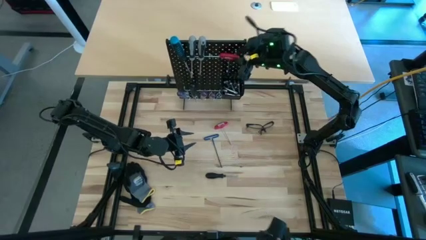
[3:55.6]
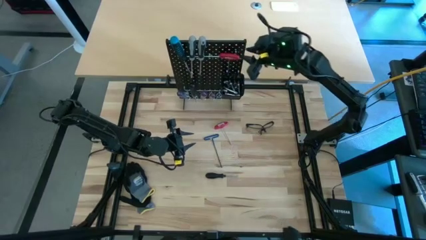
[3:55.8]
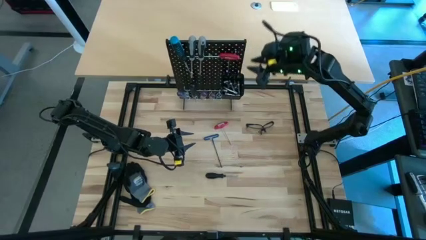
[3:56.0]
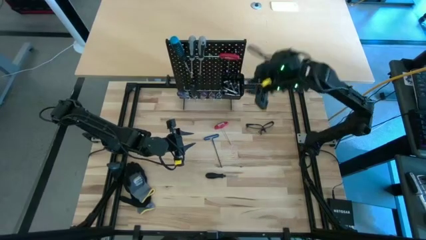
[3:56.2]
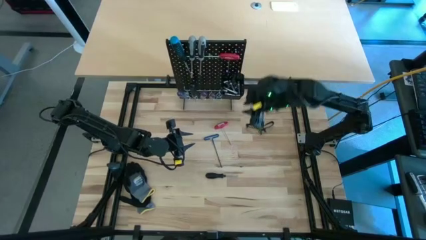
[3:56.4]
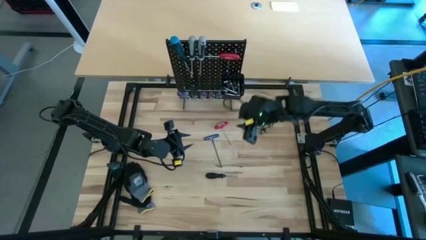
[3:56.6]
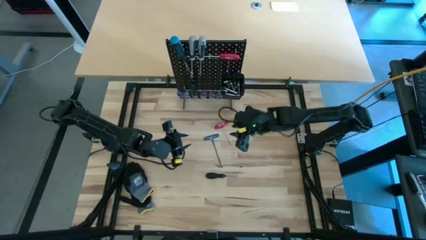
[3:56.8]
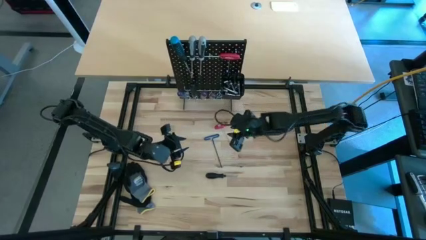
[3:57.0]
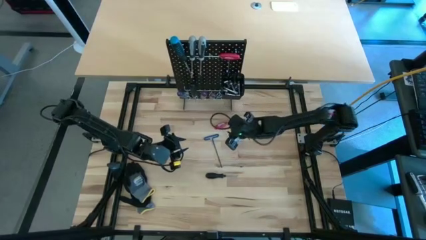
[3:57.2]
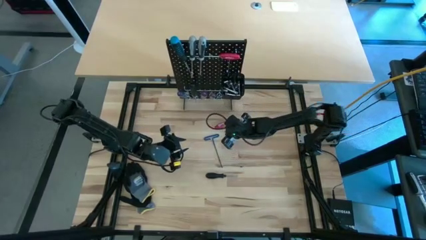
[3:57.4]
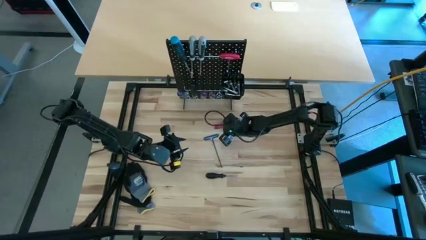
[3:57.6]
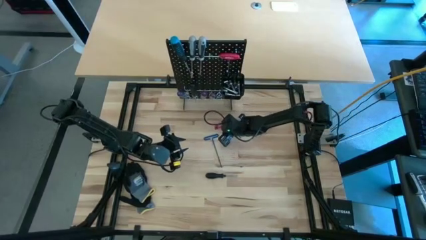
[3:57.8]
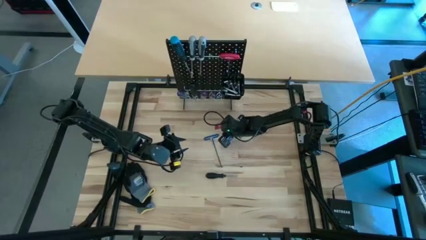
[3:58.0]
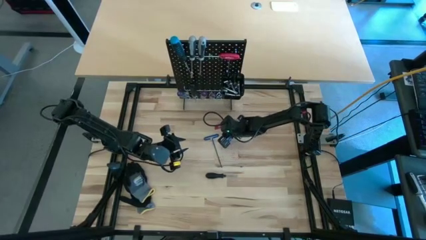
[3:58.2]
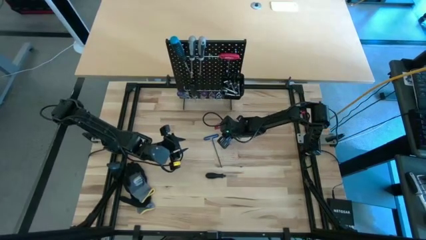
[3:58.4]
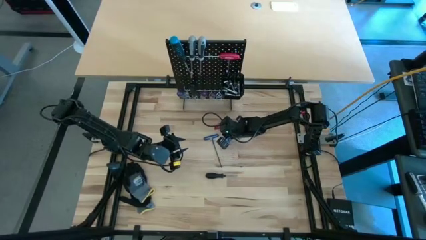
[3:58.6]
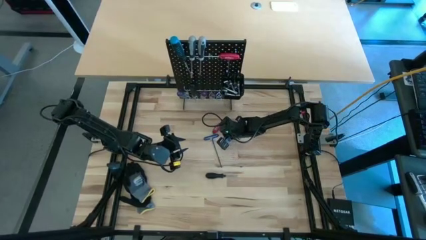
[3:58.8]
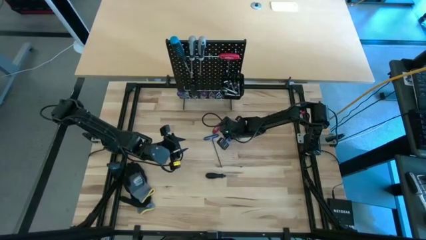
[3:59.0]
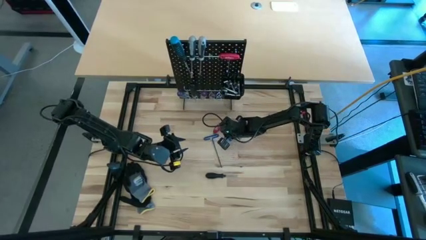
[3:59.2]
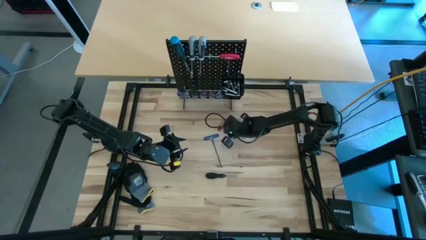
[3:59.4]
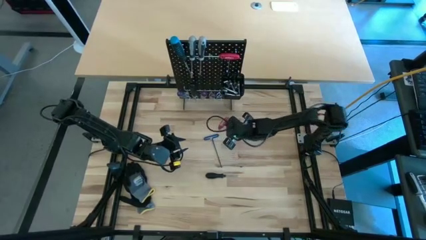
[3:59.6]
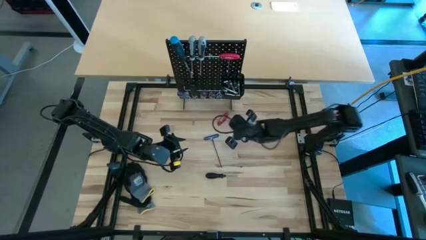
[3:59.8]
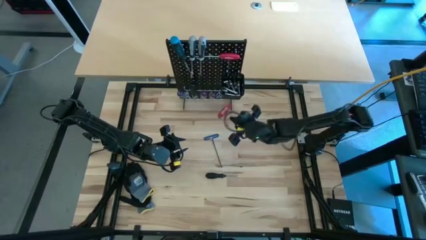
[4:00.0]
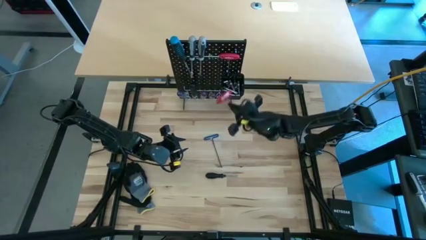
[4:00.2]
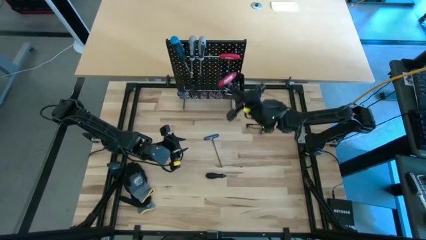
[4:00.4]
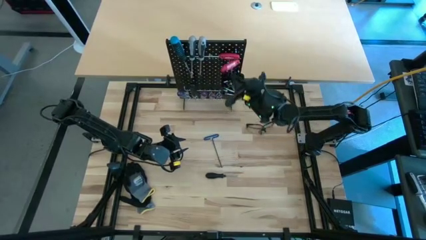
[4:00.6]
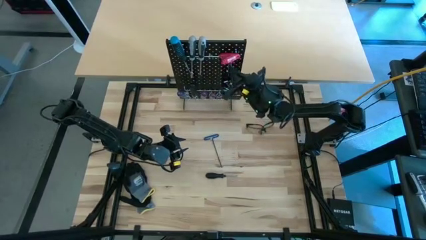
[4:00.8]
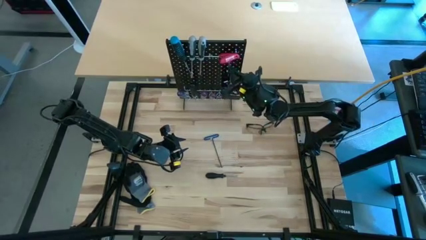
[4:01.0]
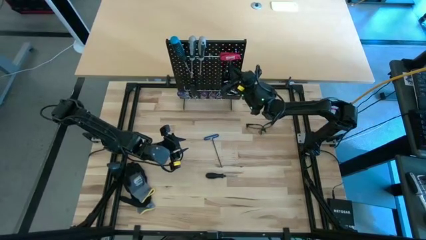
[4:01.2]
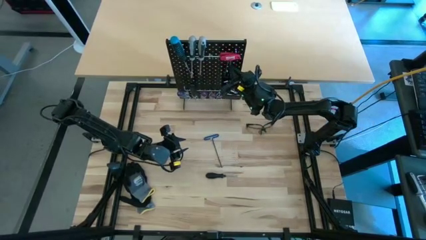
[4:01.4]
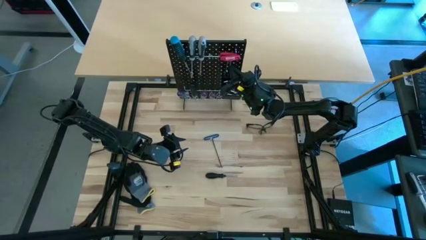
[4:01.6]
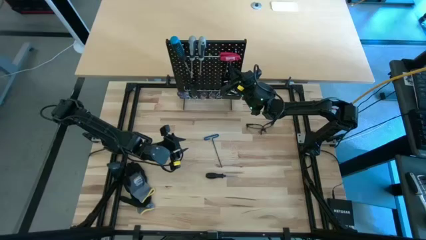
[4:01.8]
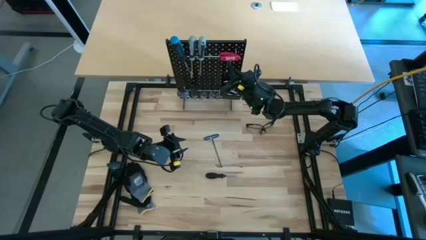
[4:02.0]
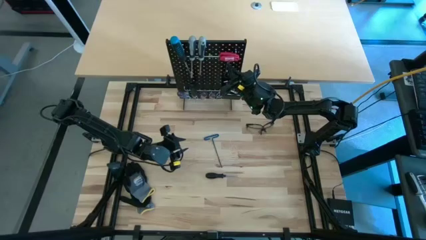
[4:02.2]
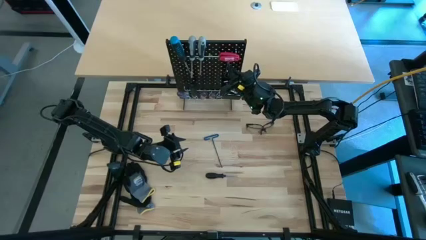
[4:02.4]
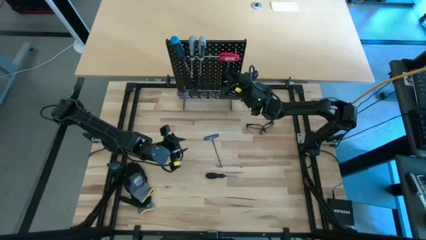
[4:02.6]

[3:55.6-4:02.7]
Task: Hang tools onto peg board
Hang the red allen wrench on the peg board

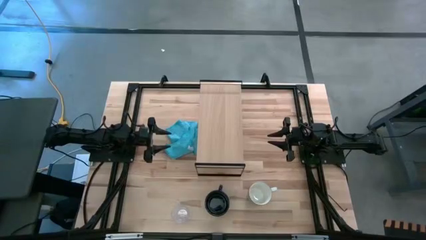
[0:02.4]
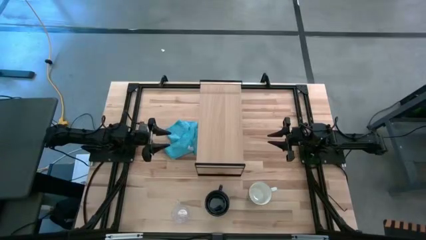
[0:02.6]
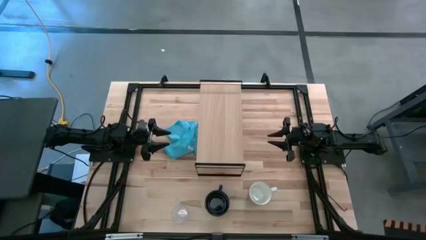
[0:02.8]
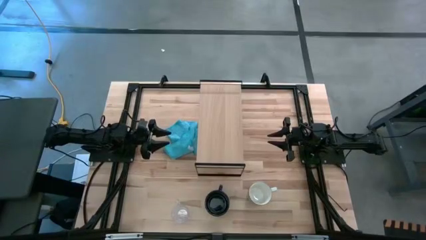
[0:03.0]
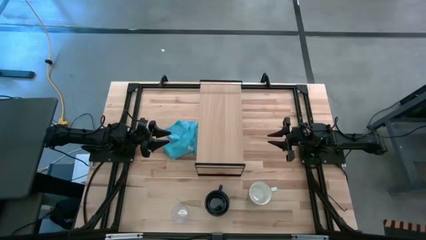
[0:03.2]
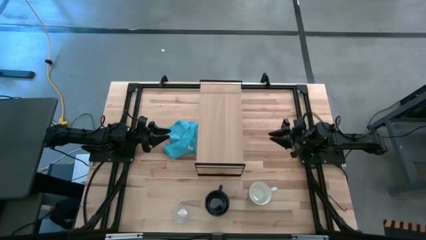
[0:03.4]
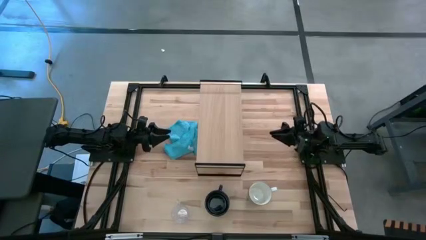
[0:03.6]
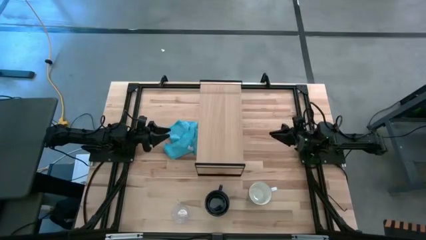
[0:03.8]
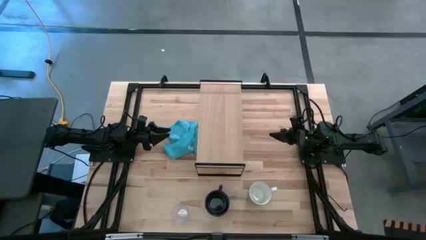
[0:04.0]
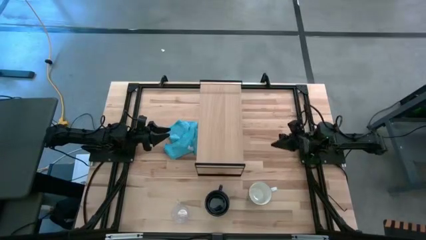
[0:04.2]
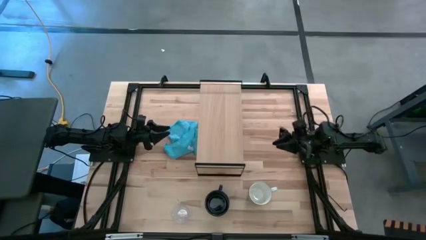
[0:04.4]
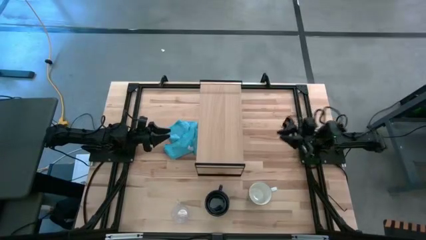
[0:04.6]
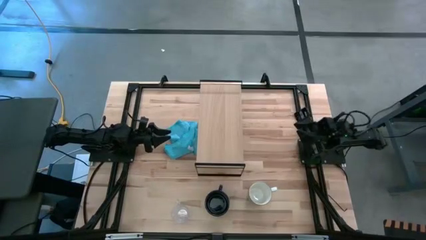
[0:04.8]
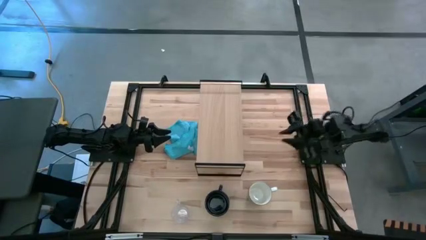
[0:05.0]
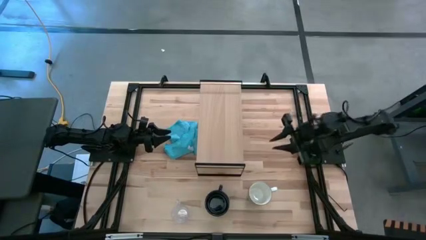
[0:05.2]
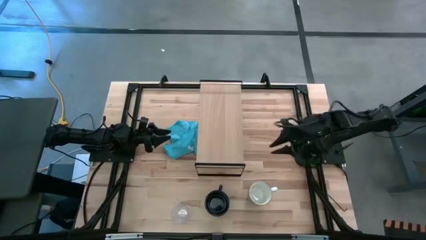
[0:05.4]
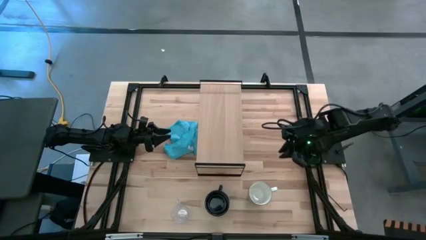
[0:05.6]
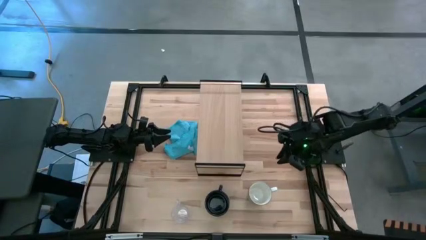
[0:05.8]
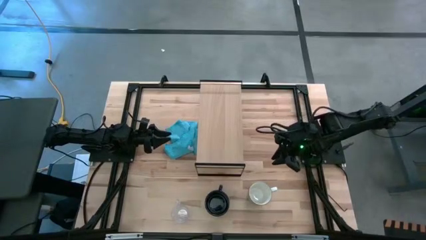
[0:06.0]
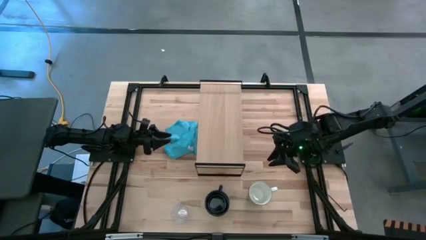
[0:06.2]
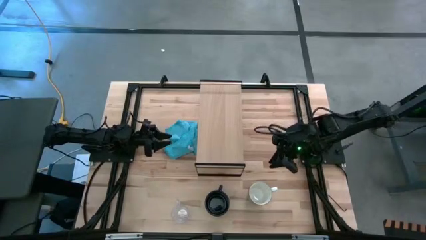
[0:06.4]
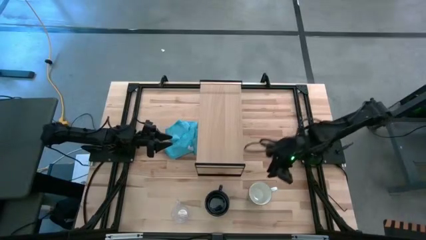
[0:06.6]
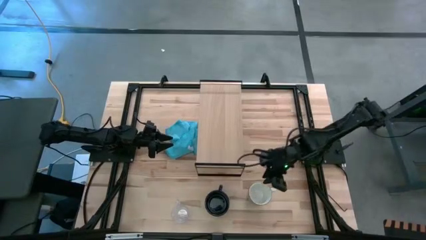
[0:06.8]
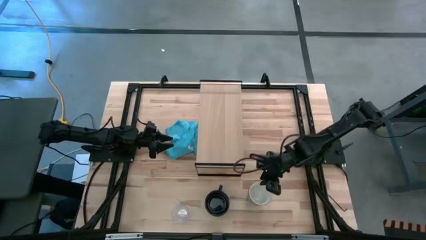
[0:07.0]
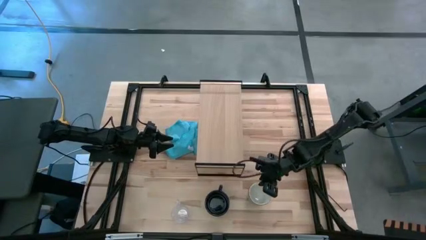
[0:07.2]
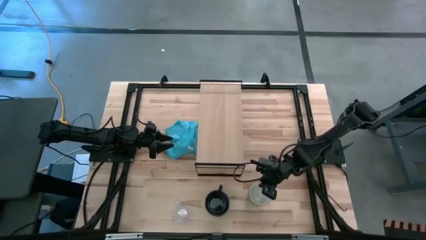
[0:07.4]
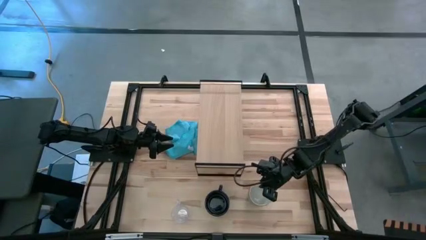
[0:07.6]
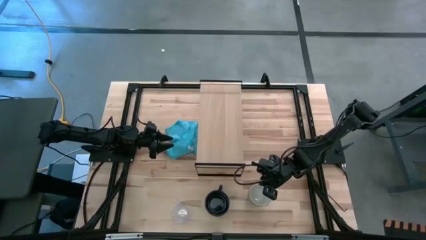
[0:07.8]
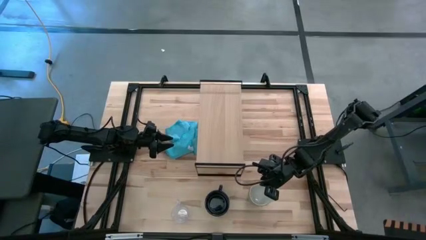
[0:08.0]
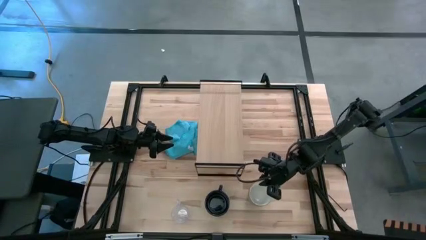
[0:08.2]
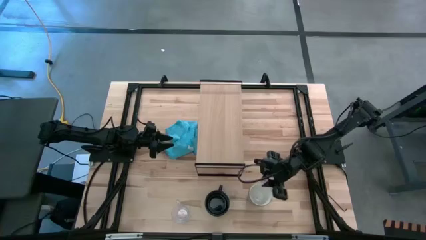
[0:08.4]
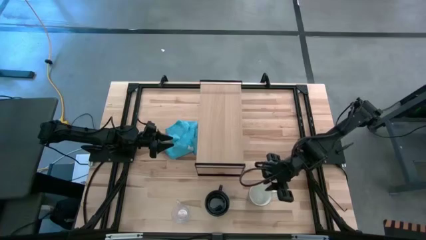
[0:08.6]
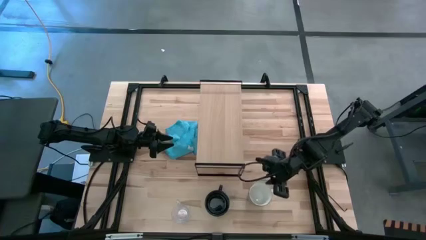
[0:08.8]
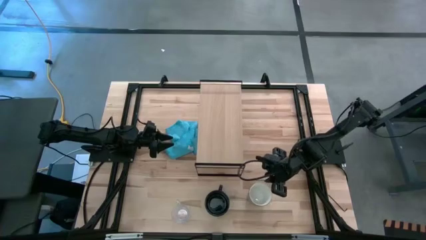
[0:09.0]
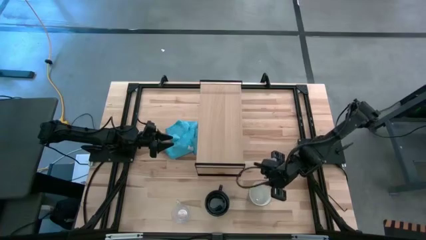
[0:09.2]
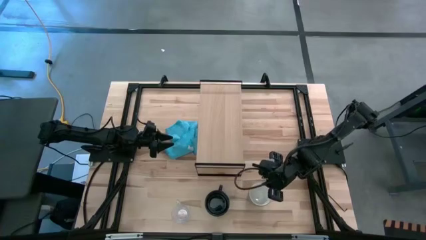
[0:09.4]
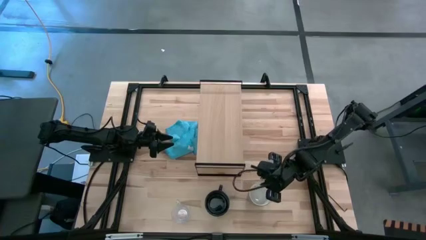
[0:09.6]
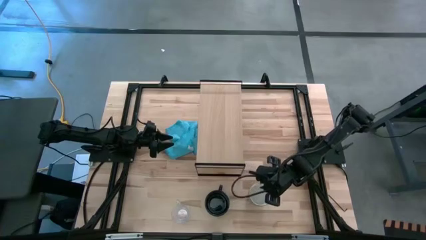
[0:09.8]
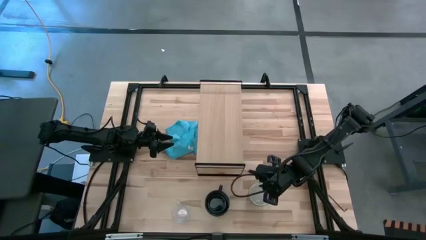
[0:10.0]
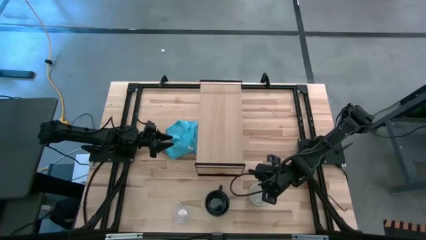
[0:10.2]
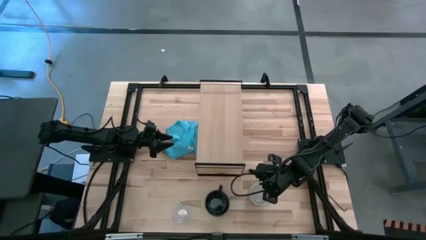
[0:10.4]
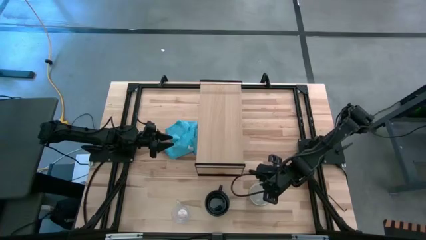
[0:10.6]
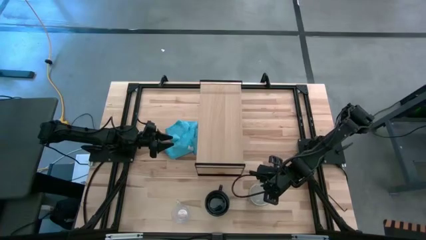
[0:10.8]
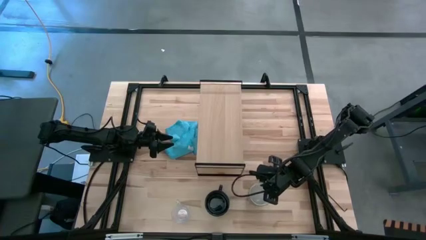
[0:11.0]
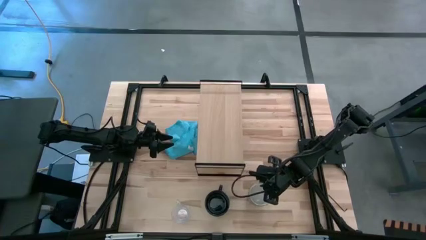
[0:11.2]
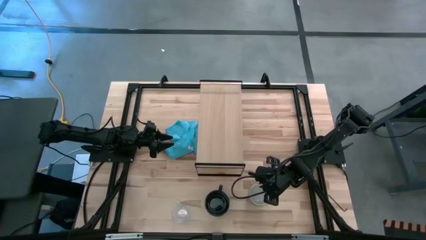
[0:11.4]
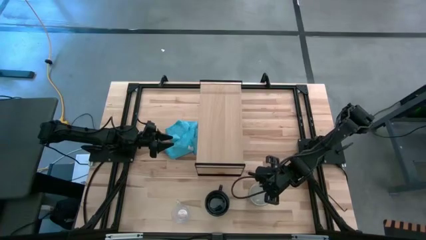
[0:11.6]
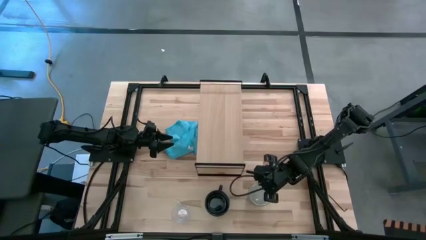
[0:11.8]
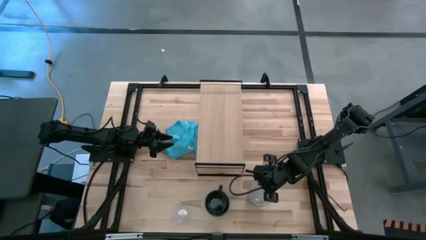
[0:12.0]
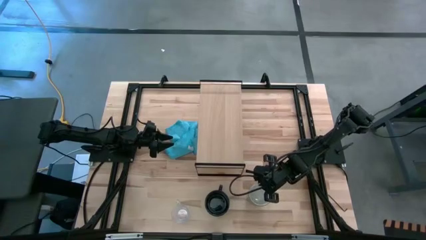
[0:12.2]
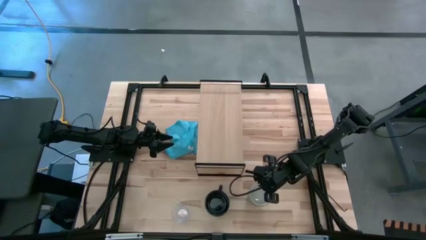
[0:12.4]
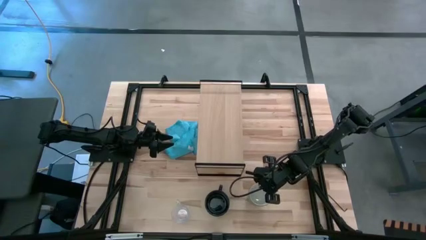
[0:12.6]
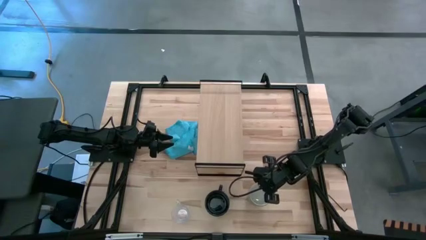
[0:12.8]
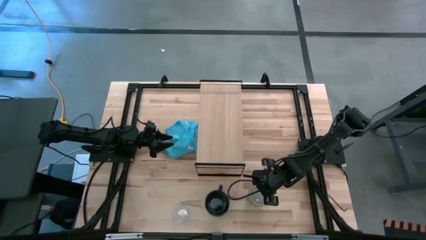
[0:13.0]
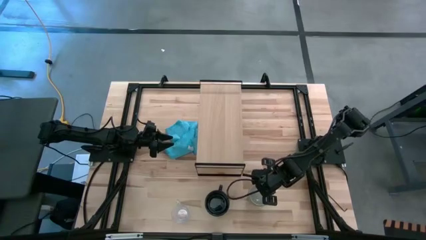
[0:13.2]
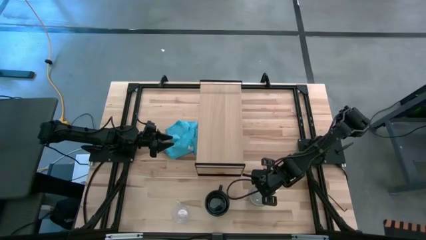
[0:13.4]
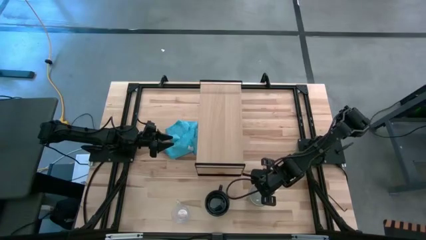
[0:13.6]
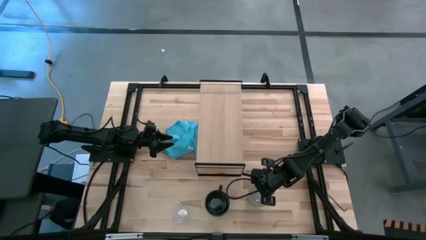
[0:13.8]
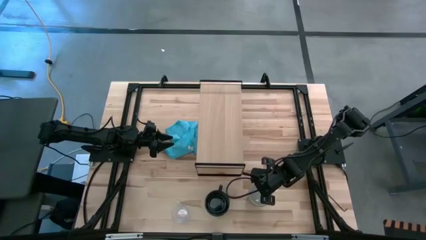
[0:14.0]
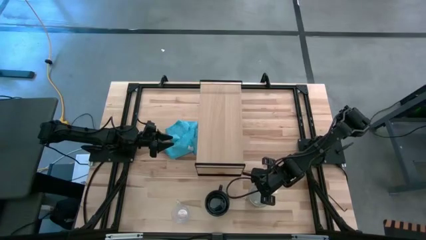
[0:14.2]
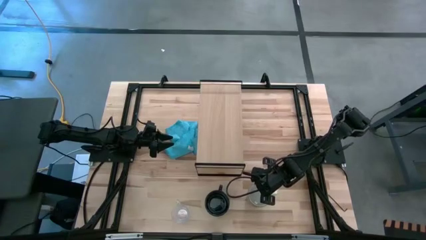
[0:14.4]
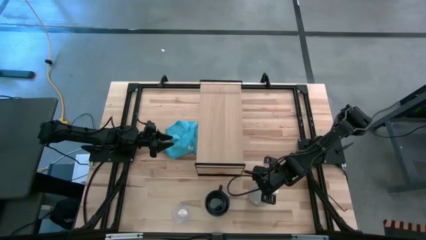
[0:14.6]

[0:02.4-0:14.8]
Task: Stack small to large cups/mugs on shelf
Put the blue mug on the shelf
